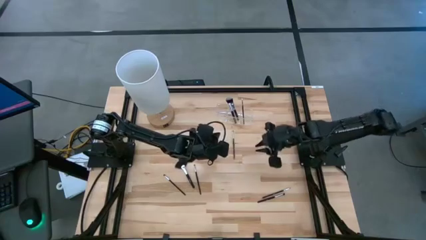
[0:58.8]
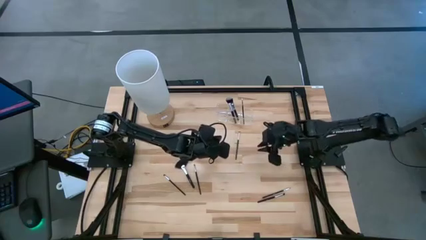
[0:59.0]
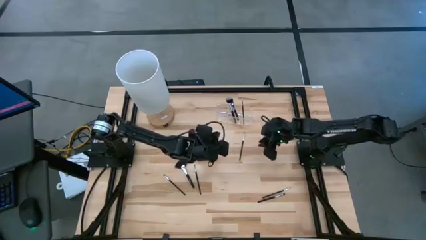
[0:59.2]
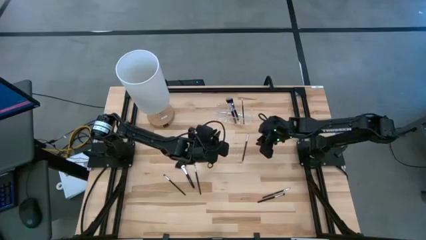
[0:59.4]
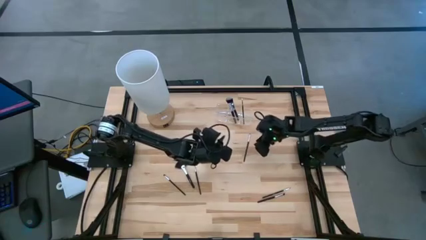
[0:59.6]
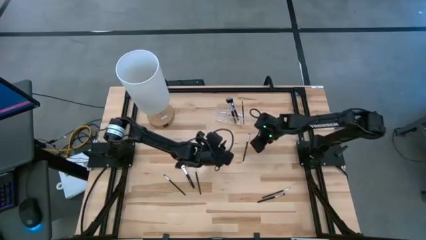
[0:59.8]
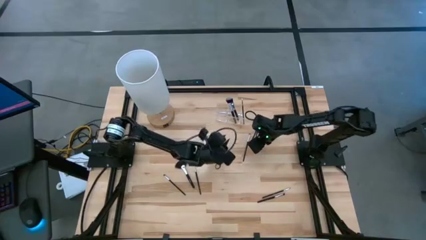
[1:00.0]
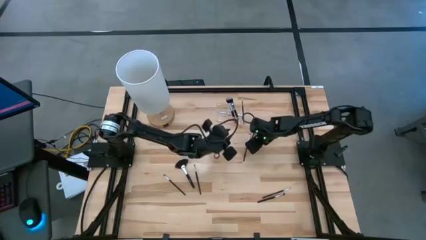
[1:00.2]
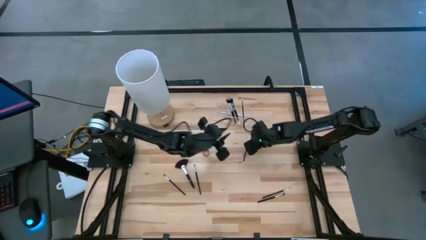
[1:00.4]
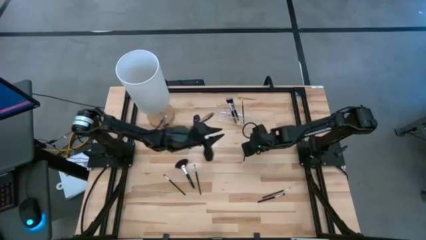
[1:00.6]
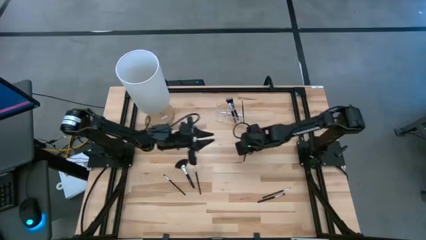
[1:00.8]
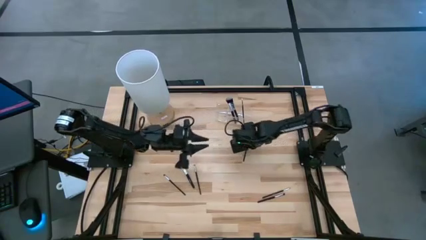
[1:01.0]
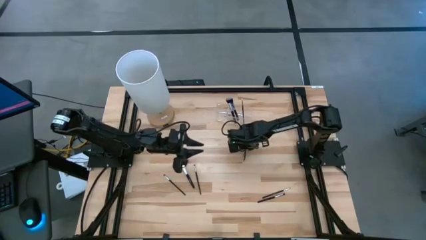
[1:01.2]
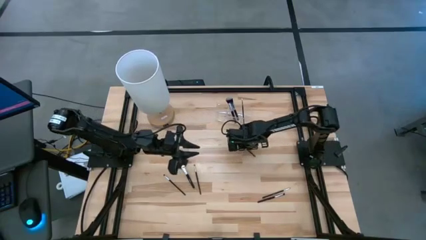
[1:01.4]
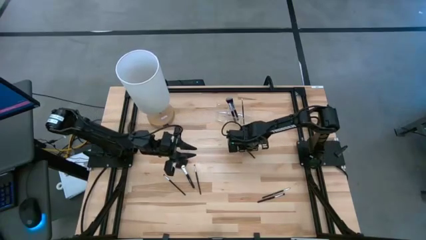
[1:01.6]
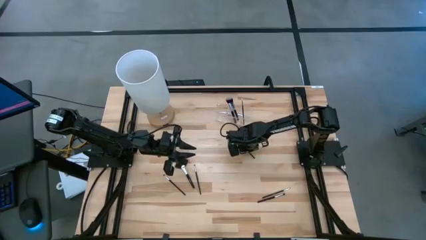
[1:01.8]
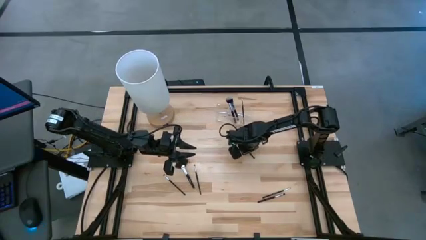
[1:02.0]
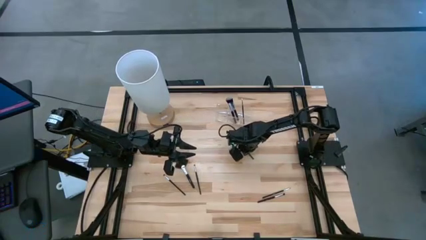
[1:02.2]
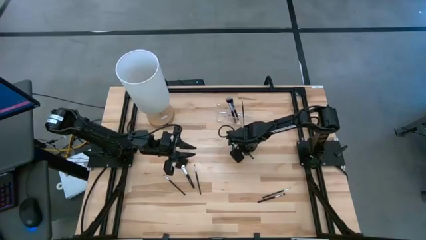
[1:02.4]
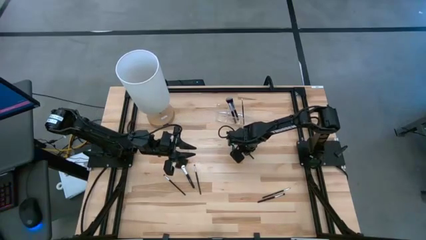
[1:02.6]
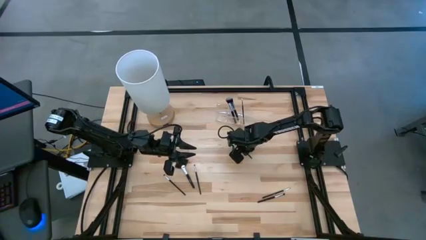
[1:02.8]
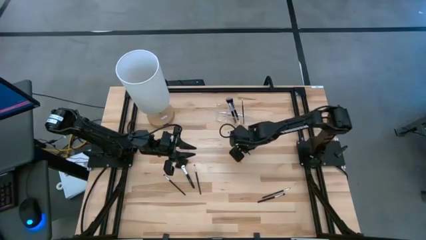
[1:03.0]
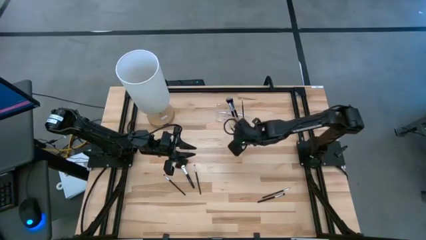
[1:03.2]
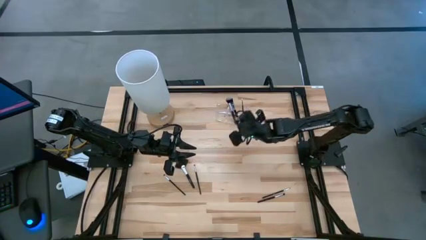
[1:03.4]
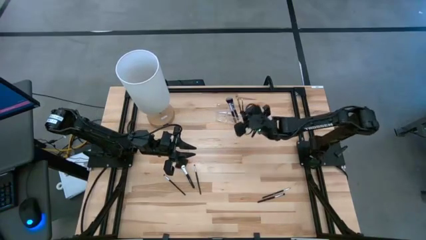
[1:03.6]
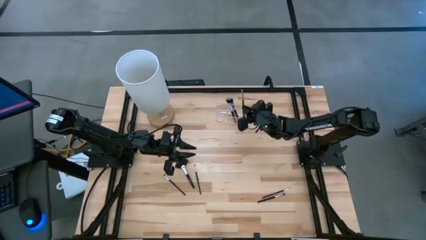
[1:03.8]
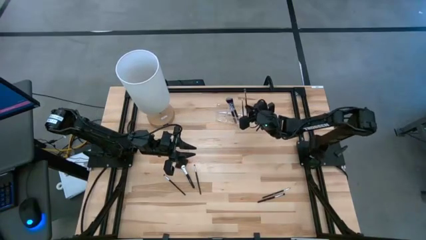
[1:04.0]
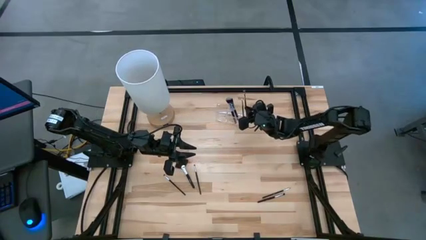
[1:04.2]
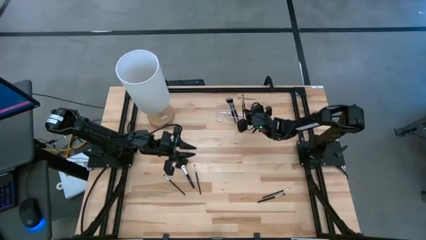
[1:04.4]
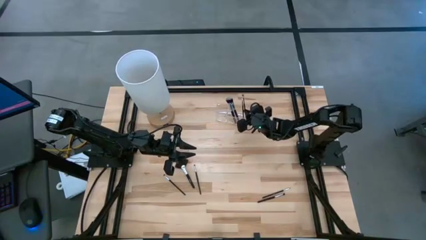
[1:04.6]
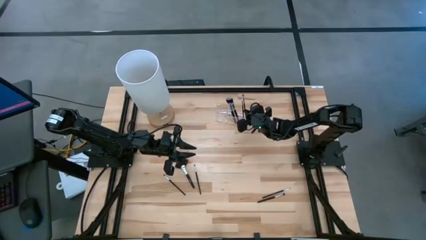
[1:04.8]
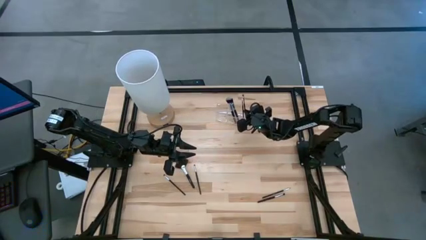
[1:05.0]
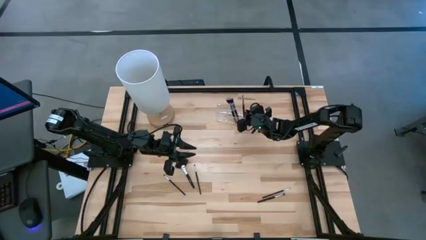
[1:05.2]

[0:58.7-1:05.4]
Task: Put items in baskets/containers
Put the black eyeshadow brush into the transparent organizer

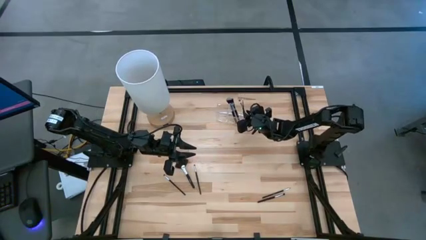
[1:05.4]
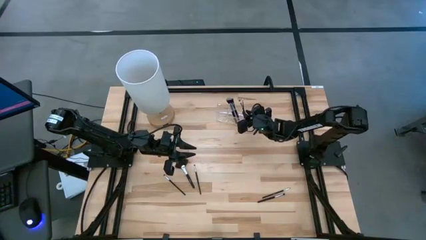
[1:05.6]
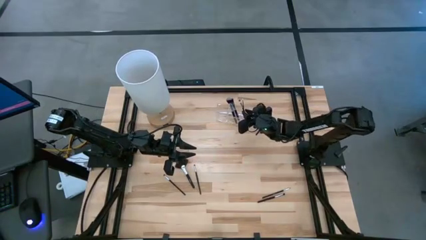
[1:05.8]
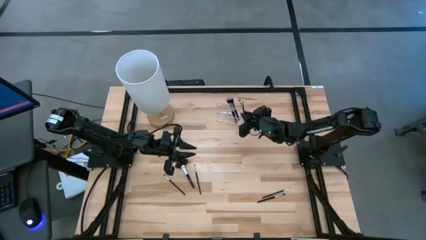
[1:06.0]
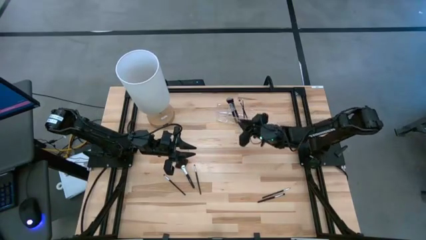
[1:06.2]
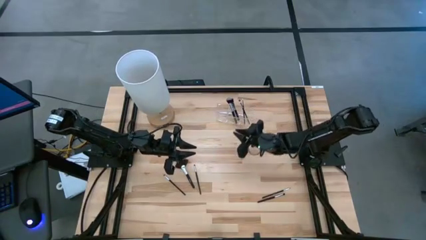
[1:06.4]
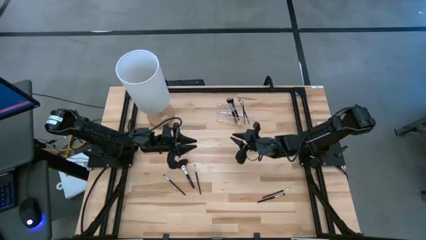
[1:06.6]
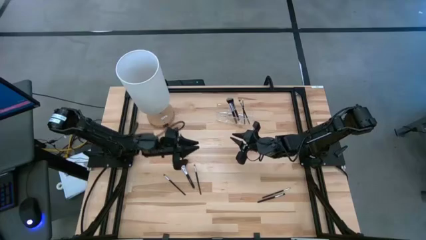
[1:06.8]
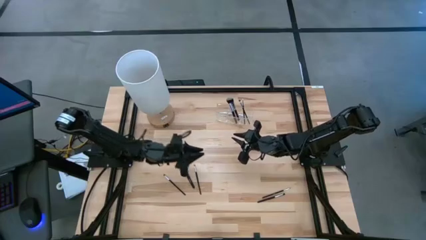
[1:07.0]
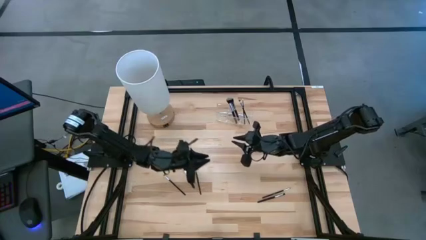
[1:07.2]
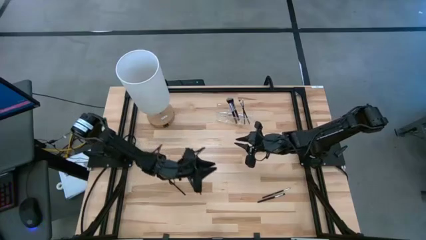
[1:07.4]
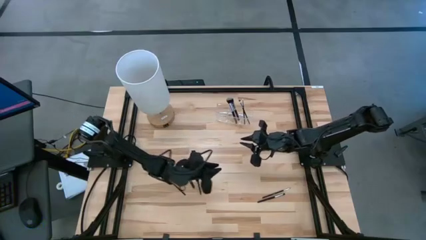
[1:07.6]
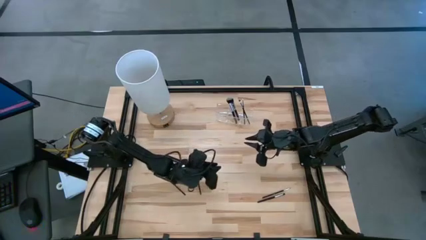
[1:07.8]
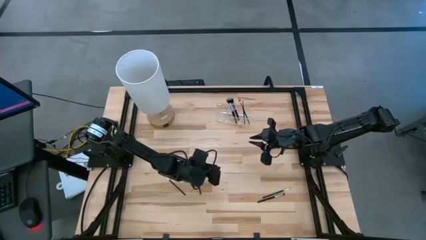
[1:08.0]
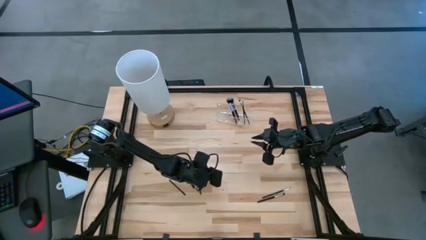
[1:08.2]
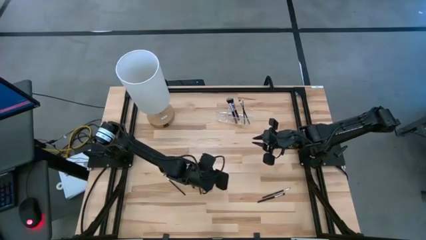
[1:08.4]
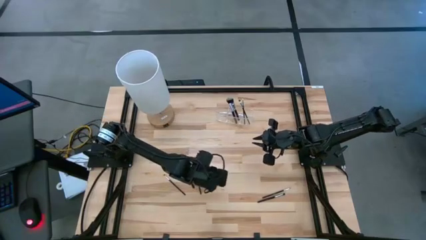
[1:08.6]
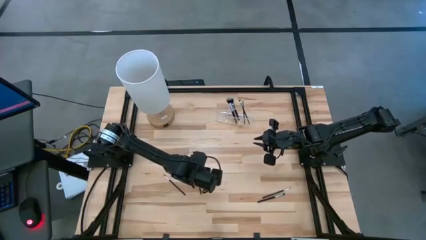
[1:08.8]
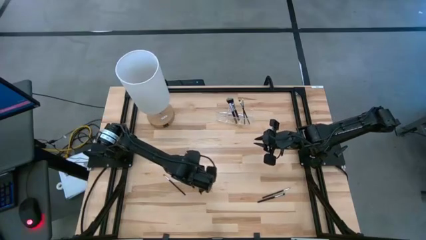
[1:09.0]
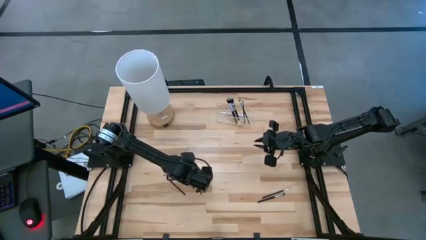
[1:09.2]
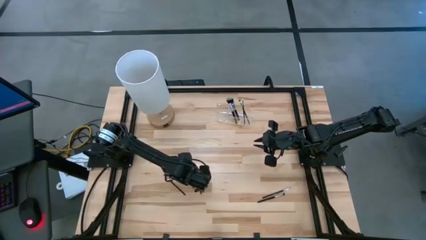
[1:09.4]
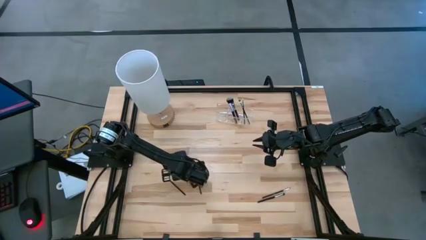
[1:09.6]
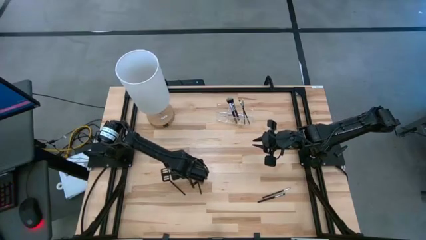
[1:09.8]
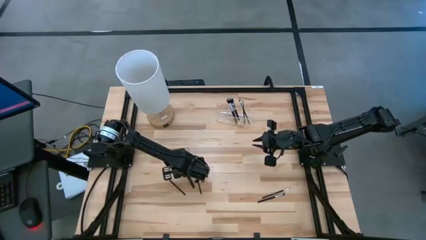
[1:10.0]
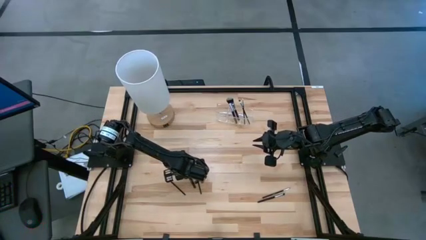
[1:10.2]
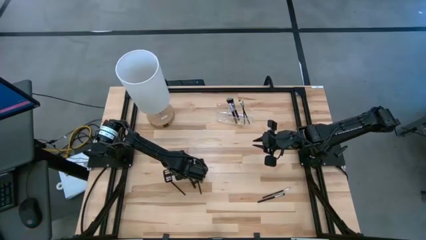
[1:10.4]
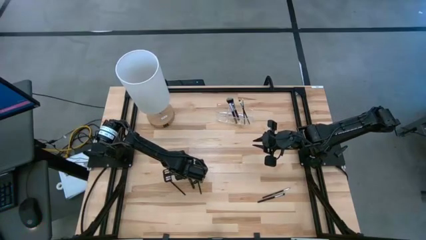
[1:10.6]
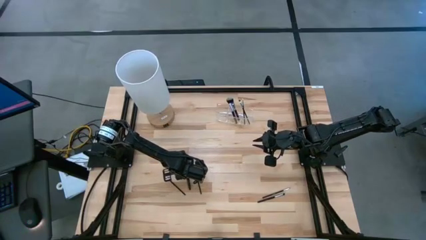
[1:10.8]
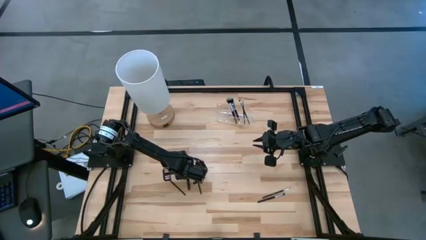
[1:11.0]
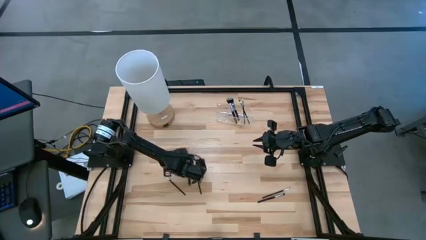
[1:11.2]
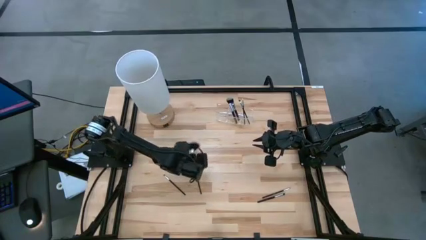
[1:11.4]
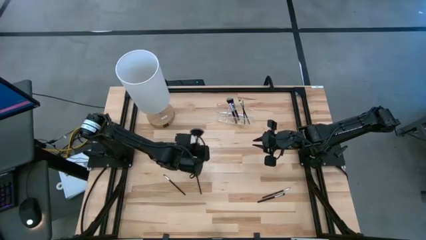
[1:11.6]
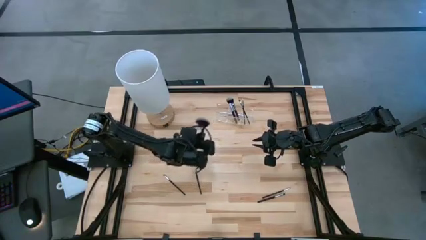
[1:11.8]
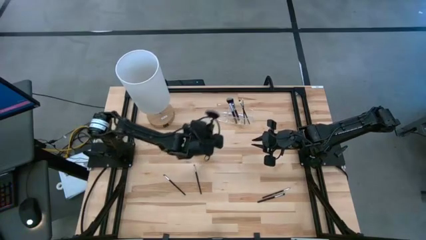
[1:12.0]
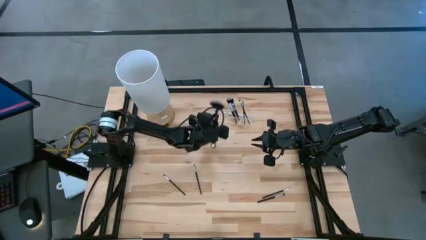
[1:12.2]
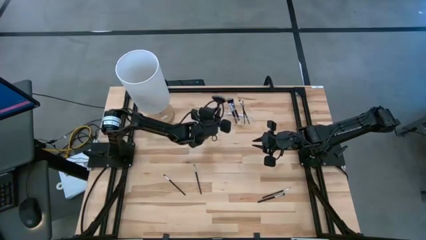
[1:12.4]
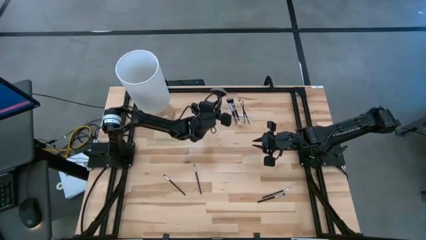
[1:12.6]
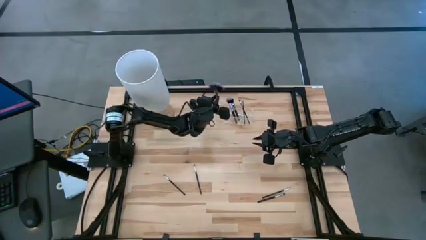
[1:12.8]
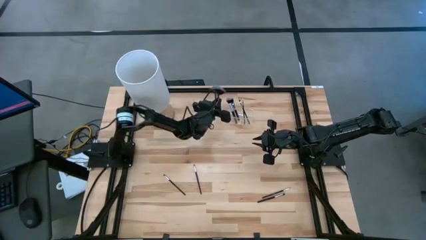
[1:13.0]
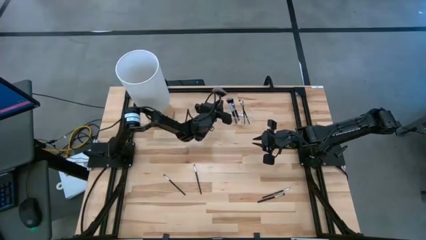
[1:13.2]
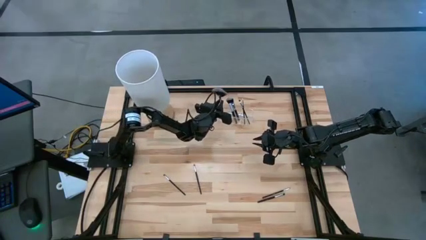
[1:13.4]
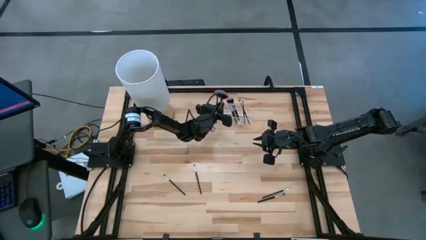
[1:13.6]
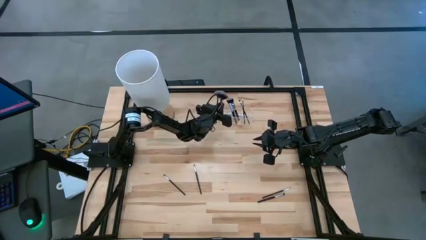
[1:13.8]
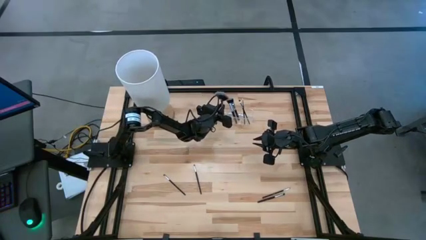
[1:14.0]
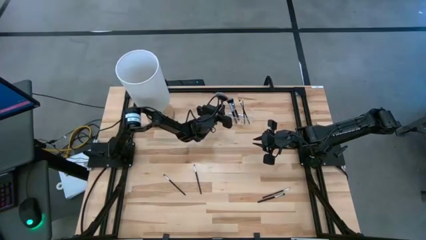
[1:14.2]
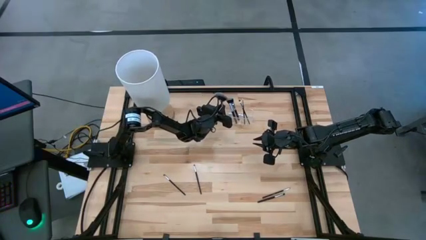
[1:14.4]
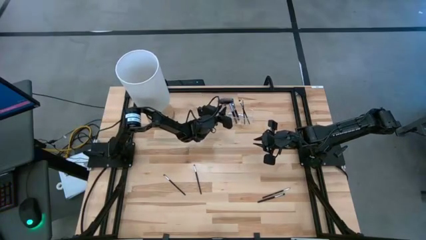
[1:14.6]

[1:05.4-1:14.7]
Put the black highlighter brush into the transparent organizer
